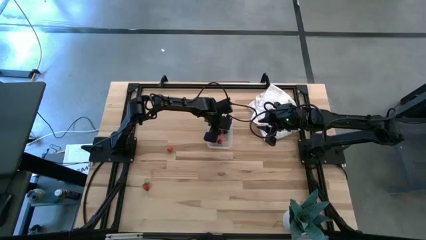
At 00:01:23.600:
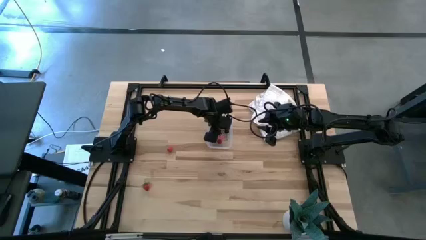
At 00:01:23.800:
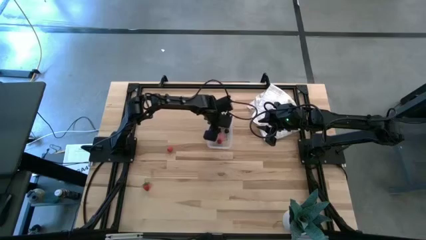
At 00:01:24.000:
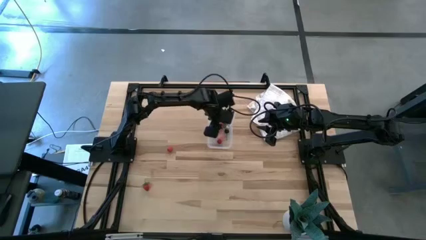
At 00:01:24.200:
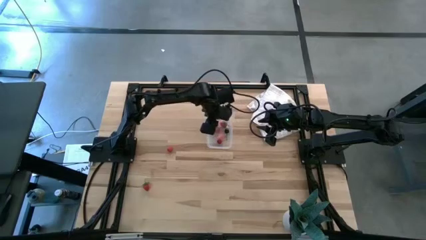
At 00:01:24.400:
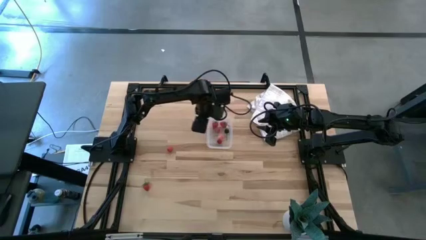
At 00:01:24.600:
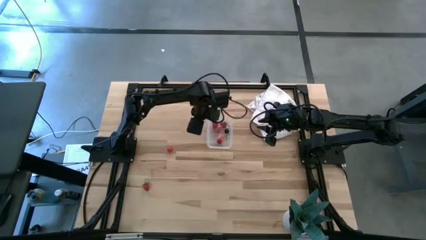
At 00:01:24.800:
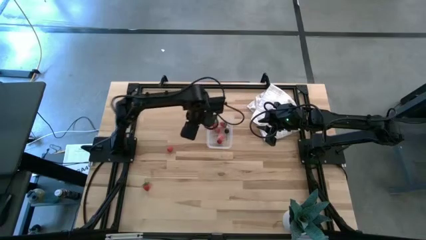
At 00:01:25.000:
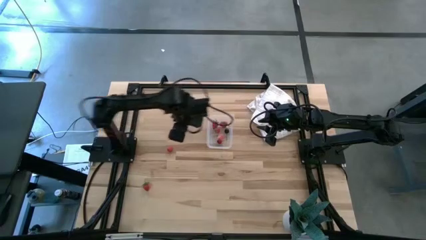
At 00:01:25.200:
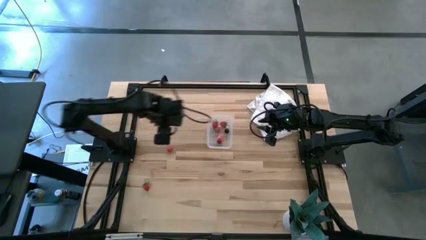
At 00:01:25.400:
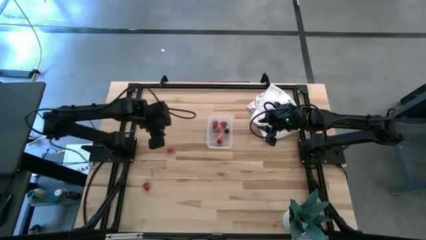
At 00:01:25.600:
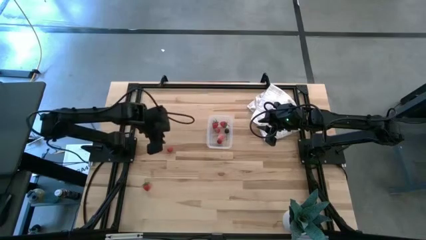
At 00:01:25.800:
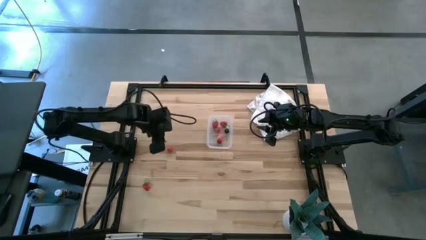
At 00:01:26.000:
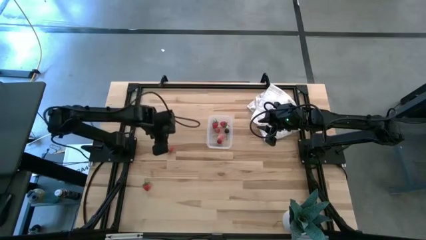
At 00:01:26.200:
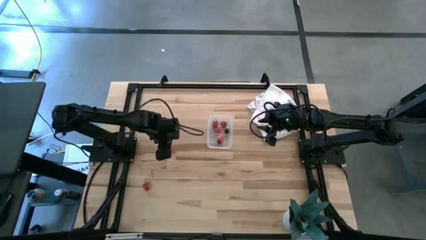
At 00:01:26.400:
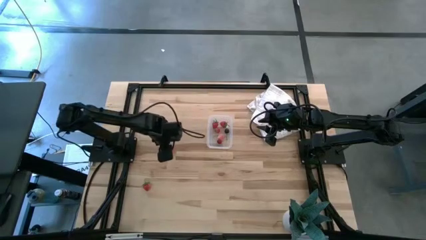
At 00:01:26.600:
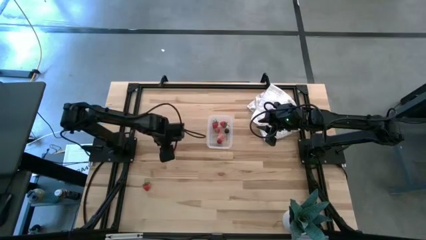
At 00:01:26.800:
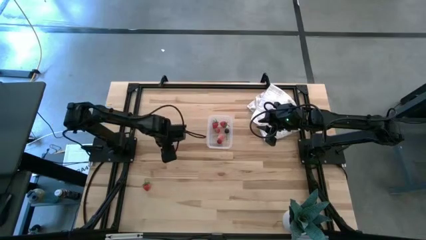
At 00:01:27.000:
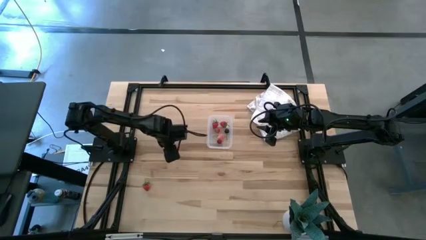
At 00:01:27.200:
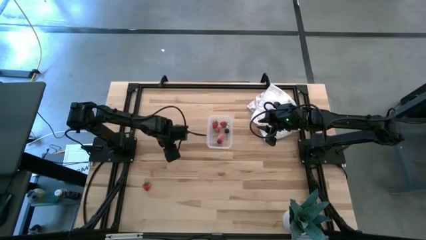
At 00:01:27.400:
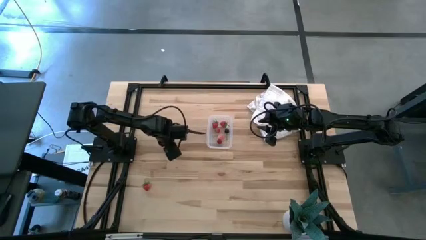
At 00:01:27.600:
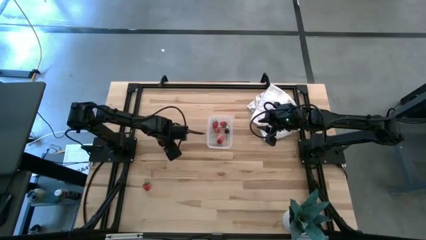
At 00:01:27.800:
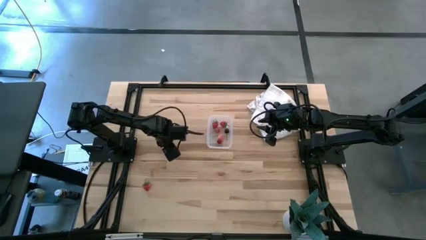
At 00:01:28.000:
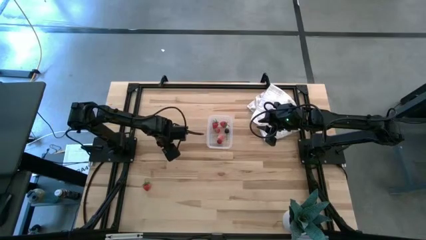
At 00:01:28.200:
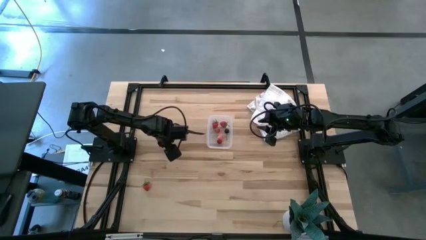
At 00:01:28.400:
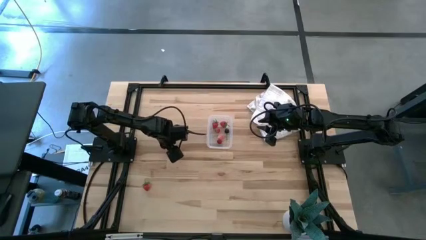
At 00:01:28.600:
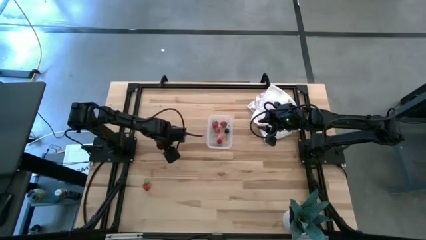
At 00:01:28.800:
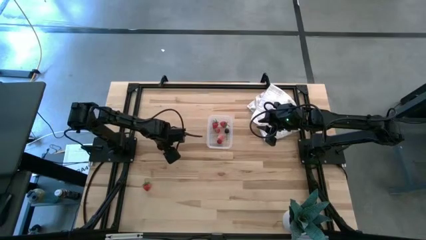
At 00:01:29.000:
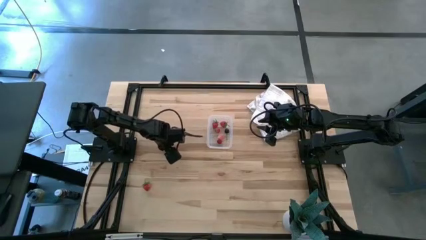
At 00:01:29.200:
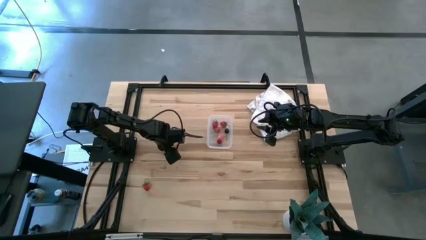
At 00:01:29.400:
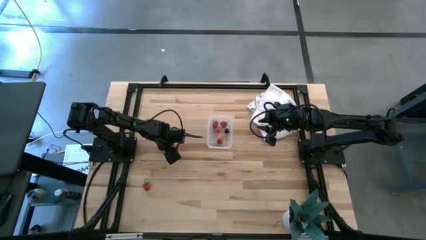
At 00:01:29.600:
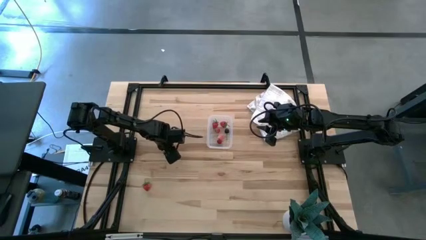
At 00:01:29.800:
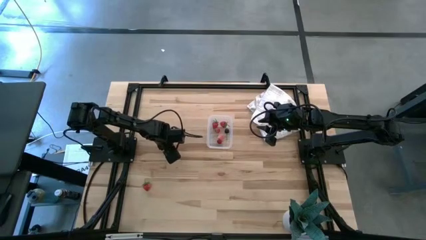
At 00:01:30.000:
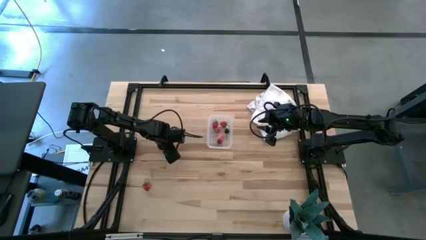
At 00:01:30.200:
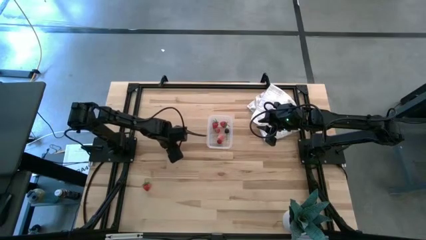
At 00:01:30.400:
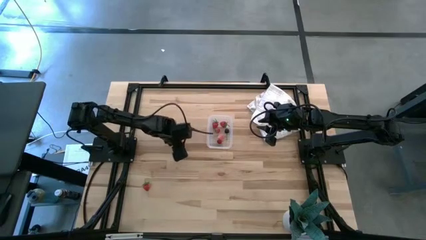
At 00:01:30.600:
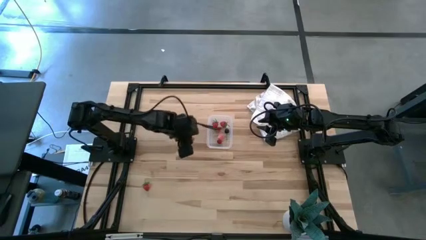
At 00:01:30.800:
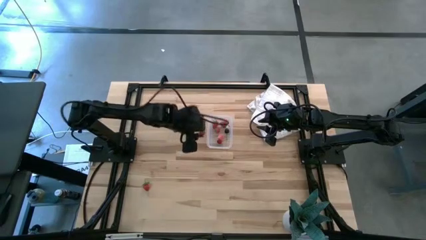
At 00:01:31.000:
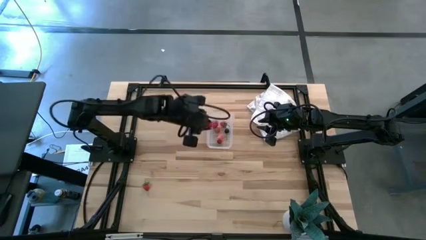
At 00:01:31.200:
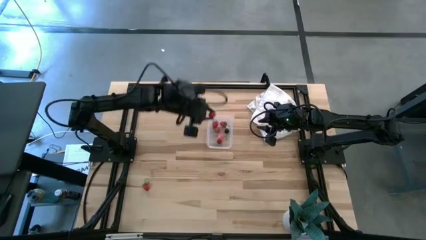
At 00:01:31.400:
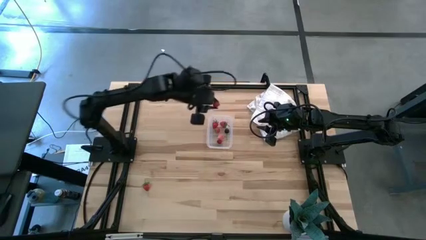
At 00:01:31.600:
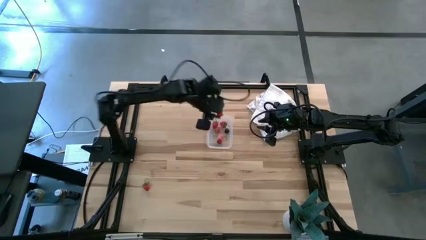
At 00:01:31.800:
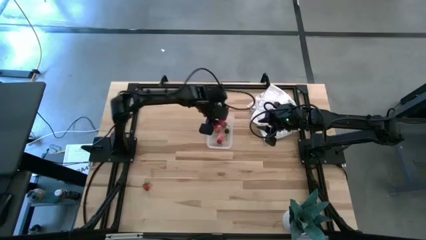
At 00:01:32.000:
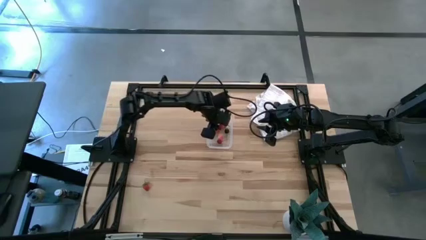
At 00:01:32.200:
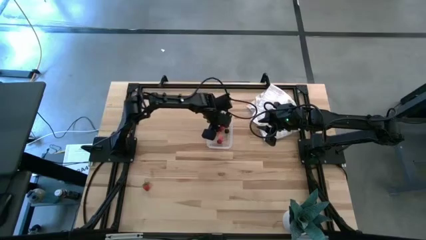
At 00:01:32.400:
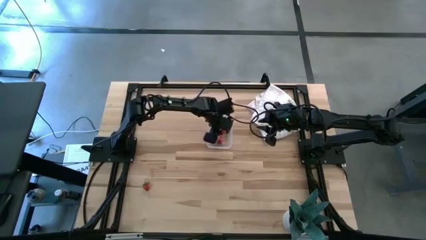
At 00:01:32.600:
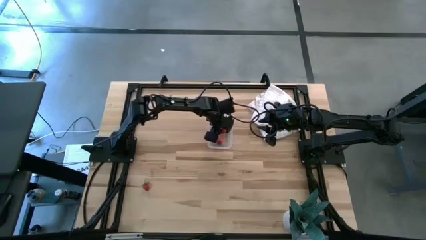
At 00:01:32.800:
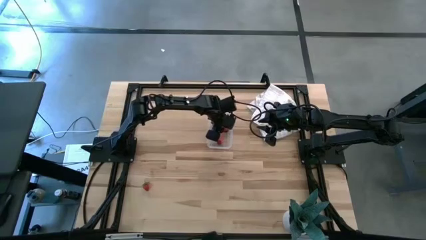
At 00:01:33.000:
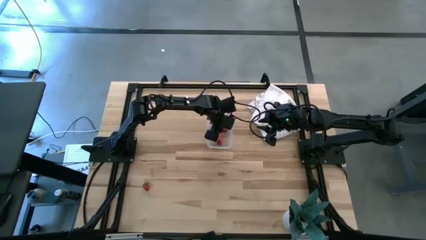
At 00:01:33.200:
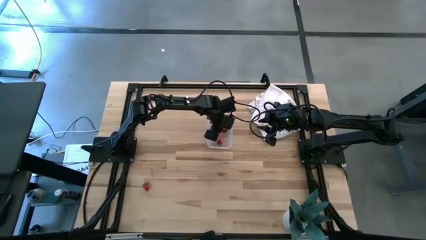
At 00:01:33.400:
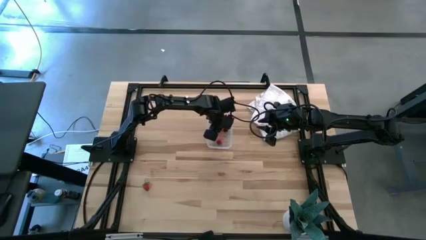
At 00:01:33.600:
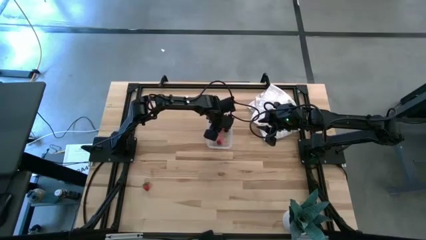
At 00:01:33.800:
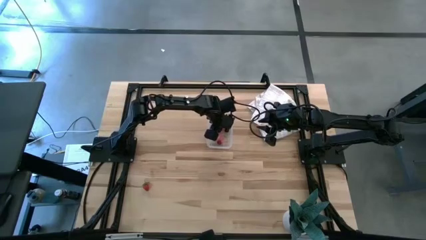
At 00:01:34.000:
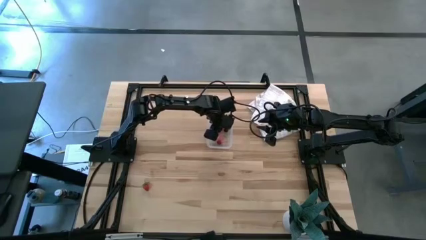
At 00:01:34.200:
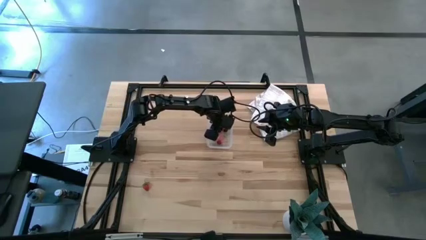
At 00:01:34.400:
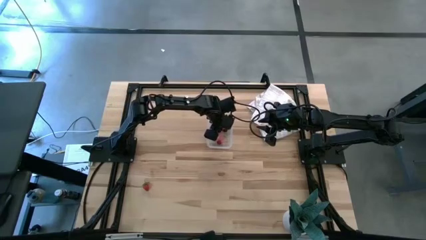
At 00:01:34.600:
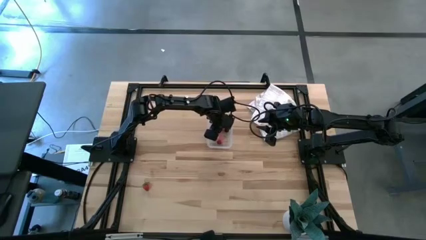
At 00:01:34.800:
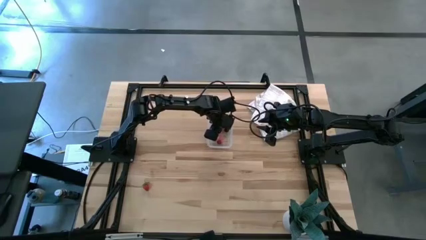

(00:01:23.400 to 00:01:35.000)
Task: Pick and placing Produce into tupperware
Put the raspberry into the transparent container
